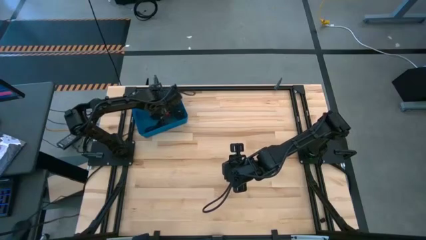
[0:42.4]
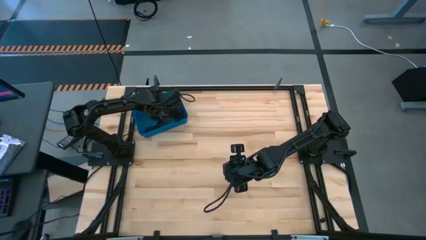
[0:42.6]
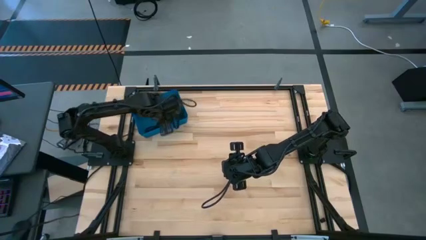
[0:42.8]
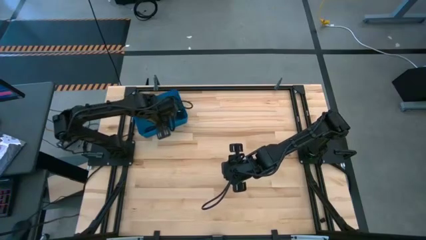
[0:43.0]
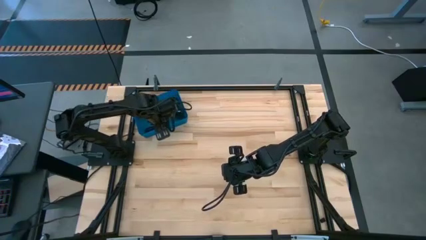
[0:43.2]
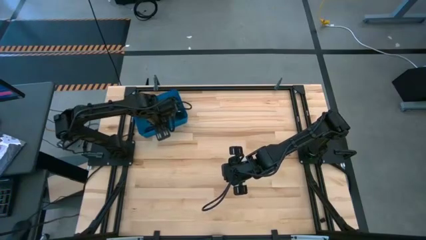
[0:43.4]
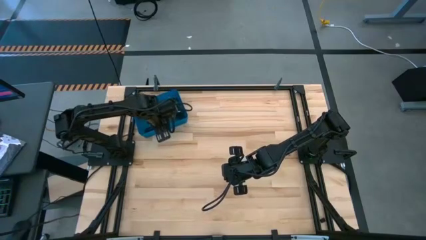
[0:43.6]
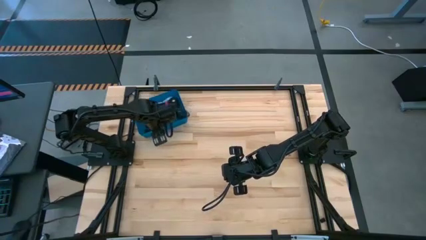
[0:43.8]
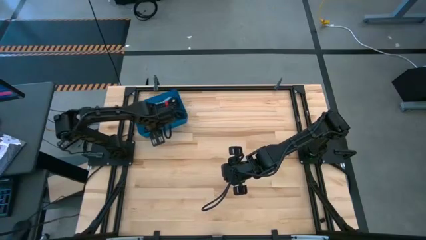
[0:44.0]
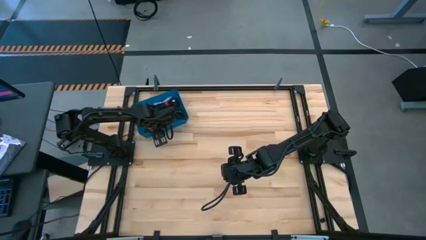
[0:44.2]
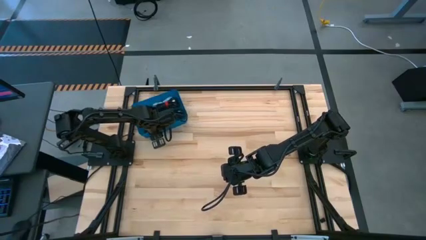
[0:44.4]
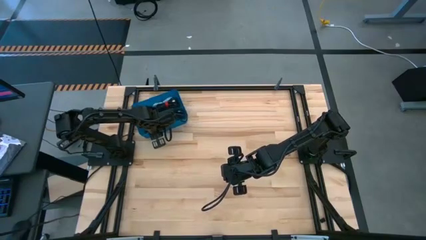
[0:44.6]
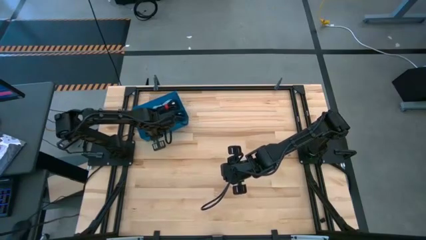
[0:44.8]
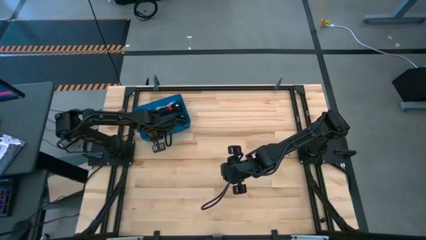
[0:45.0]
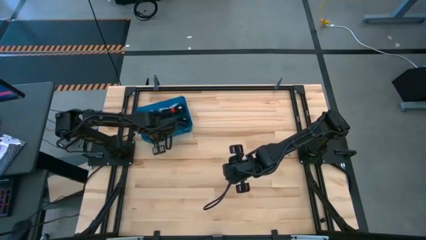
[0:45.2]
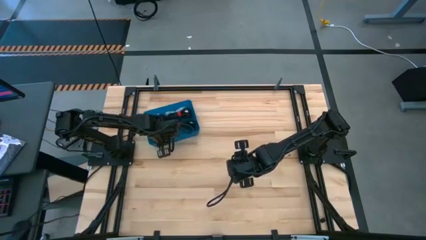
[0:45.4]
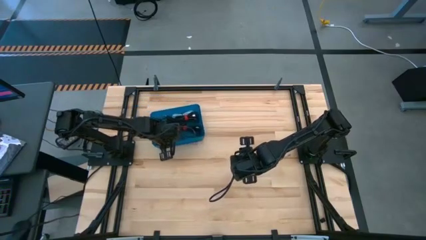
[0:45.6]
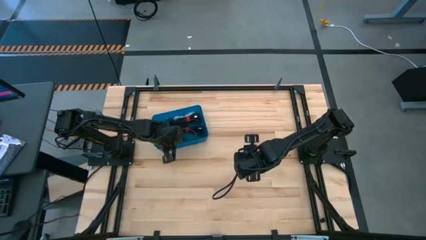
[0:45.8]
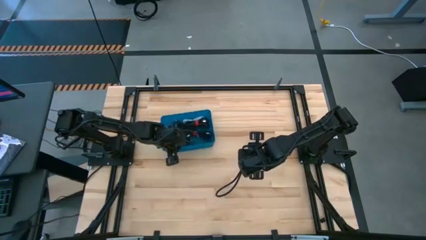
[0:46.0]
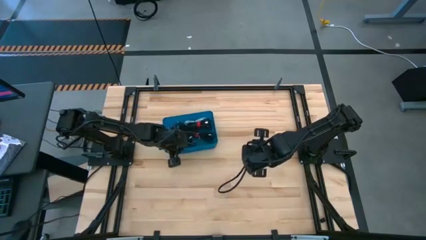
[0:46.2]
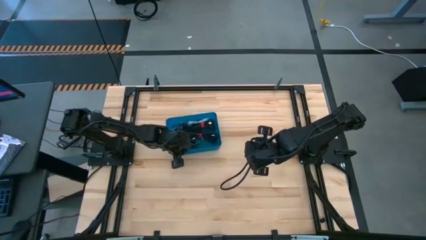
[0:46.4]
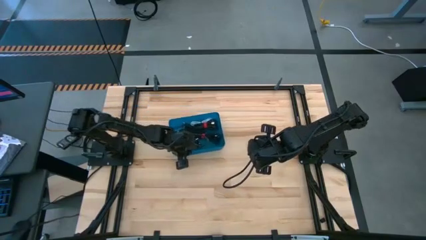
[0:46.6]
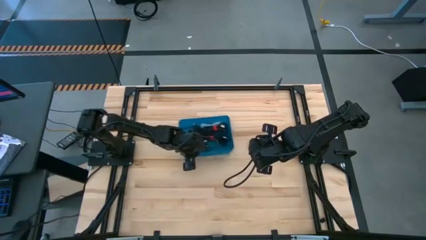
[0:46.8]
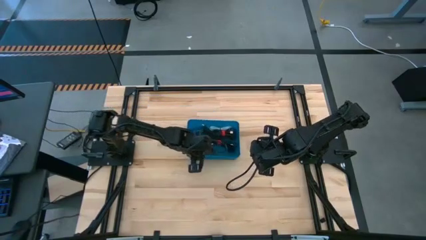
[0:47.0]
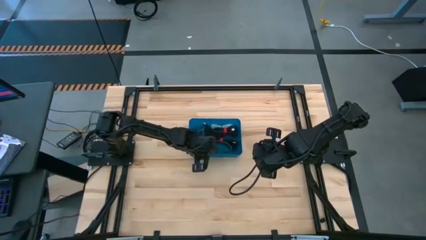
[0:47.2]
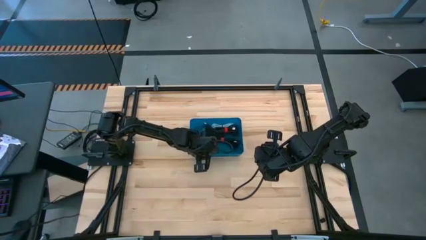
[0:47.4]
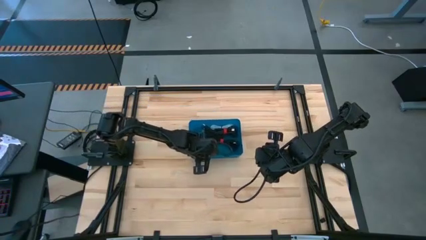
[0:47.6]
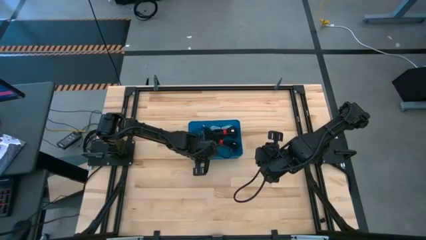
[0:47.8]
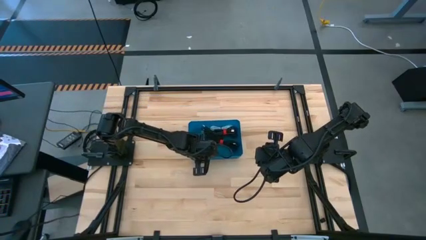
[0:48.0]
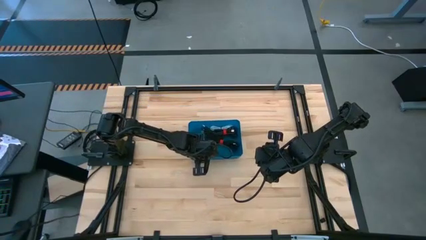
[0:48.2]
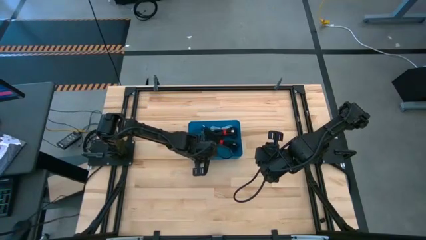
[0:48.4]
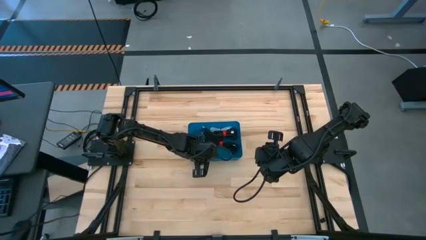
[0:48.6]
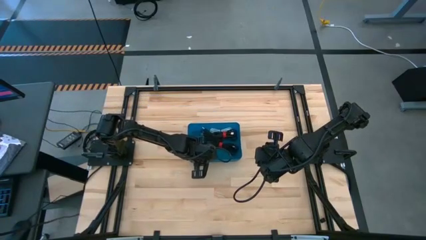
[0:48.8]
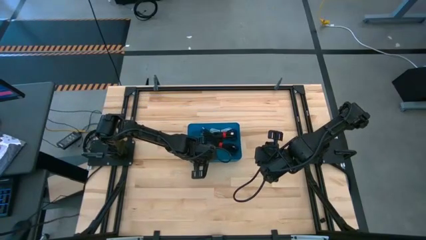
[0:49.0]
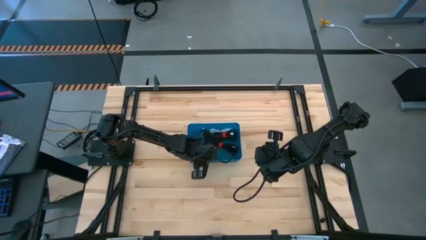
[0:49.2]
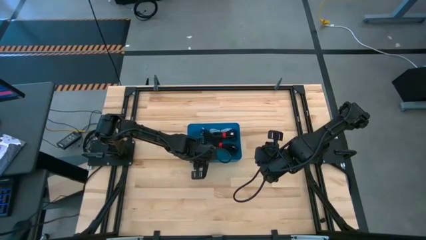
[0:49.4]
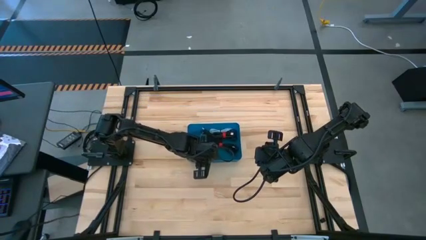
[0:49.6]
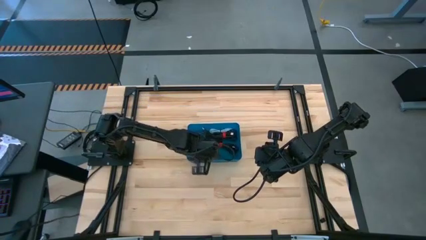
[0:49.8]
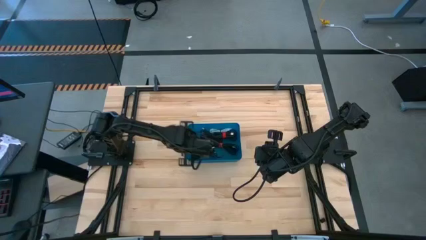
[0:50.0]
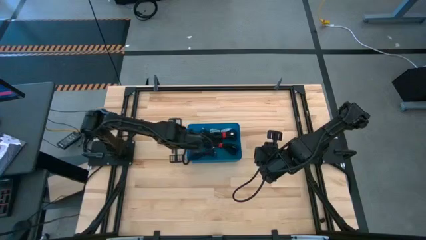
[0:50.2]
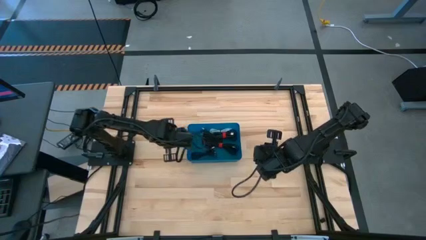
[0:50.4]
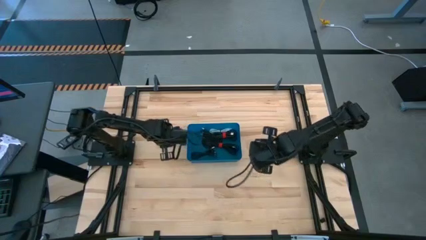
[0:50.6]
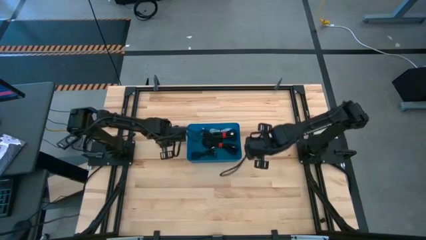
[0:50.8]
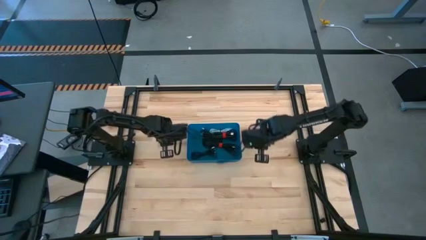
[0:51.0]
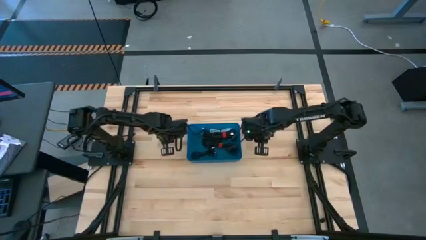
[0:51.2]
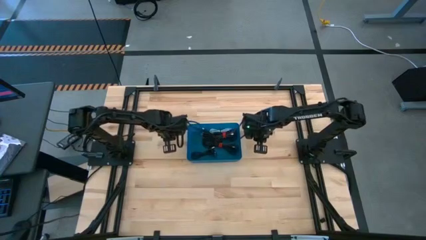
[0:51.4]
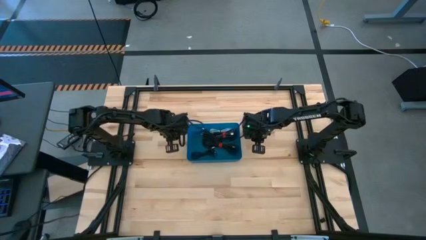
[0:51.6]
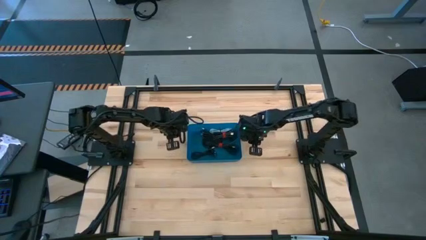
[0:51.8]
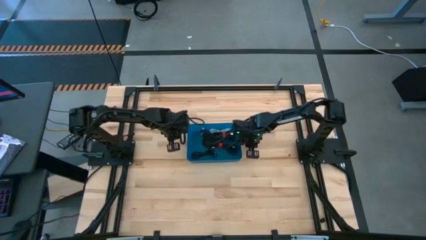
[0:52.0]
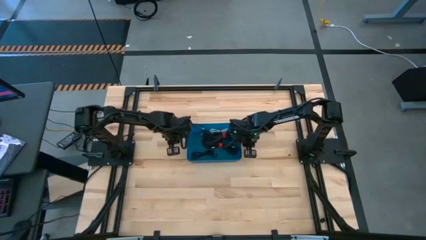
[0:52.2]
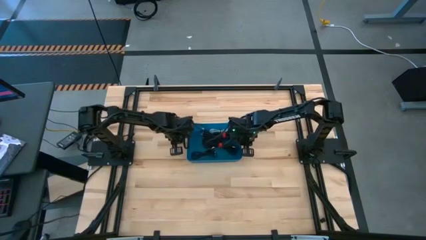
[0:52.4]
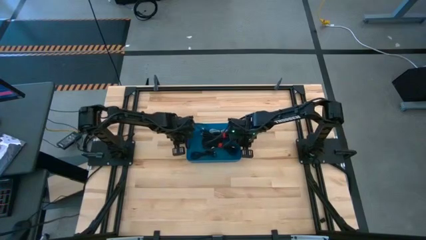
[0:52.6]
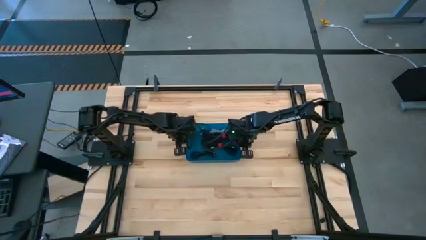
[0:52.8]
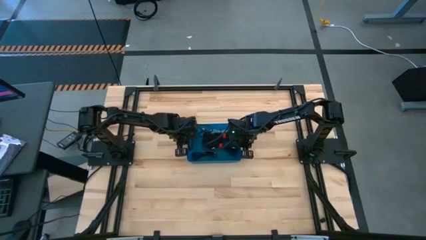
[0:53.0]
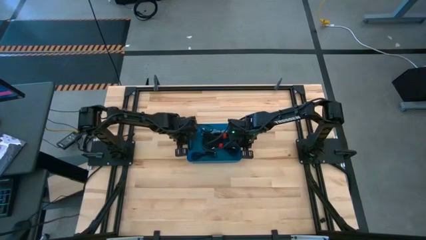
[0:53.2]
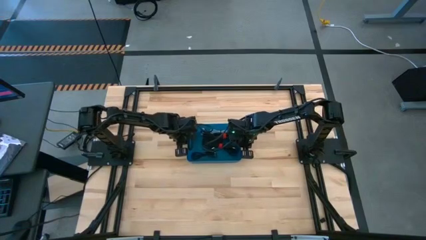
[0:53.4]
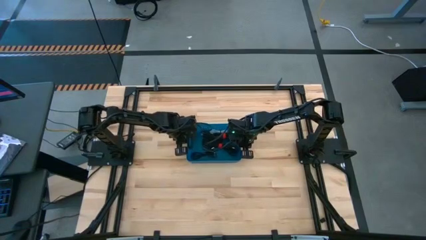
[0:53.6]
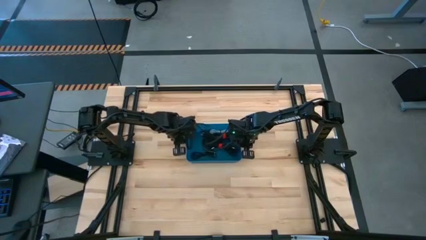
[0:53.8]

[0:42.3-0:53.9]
Task: Pick and place USB-C Cables
Move the blue bin to the center of the table

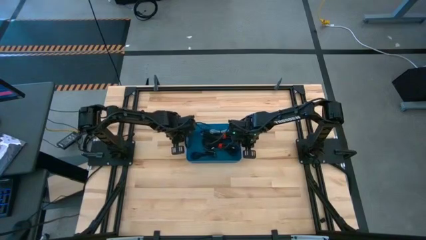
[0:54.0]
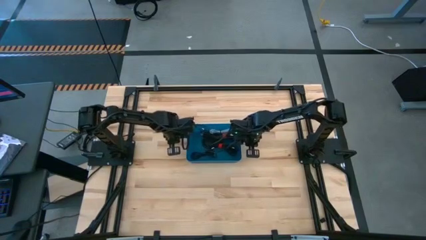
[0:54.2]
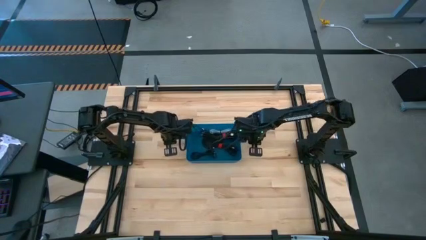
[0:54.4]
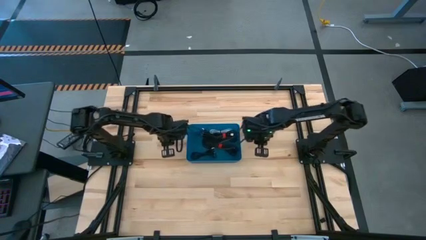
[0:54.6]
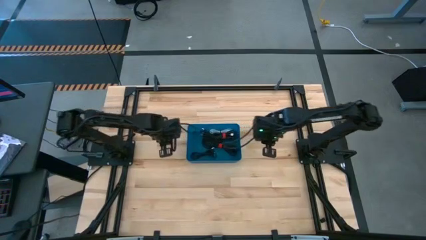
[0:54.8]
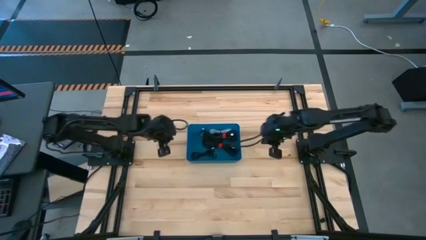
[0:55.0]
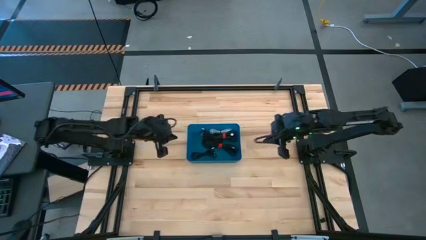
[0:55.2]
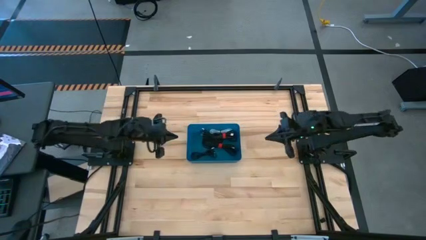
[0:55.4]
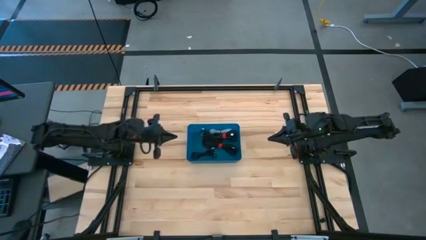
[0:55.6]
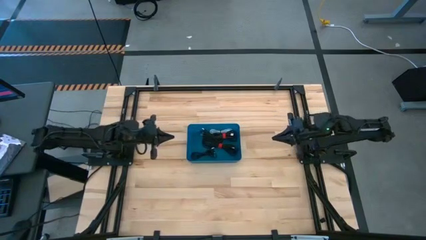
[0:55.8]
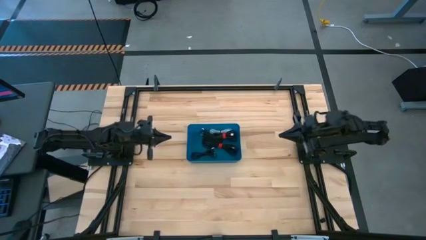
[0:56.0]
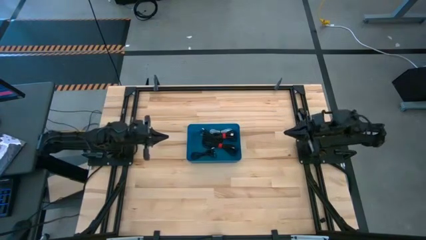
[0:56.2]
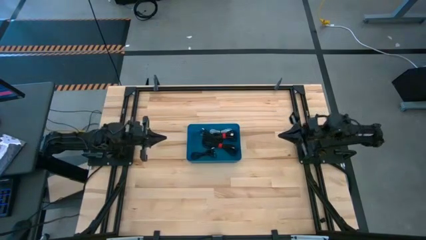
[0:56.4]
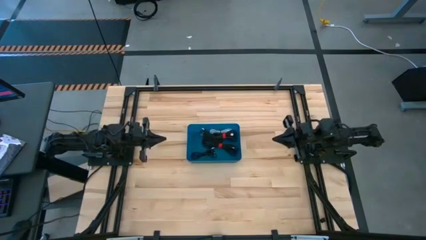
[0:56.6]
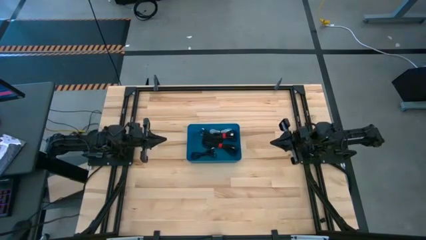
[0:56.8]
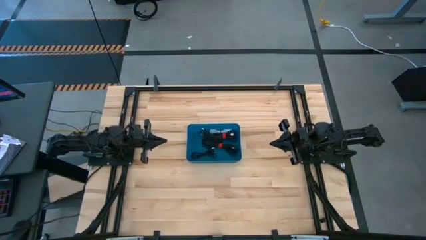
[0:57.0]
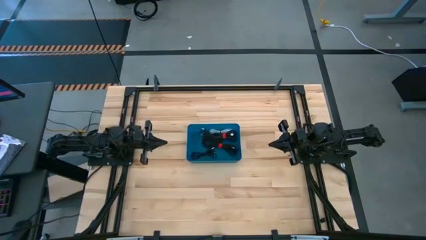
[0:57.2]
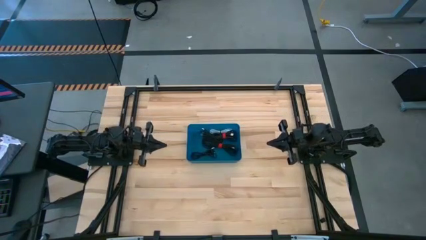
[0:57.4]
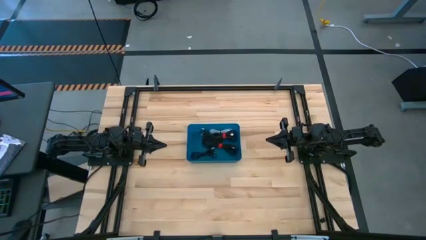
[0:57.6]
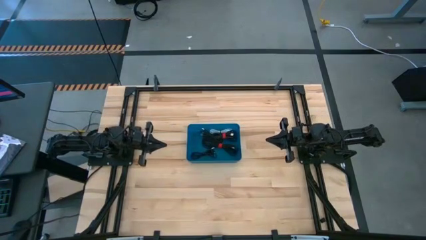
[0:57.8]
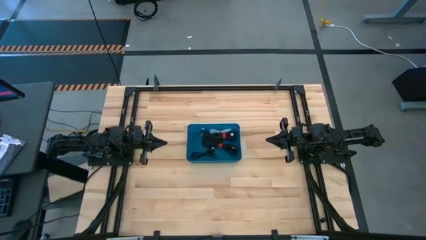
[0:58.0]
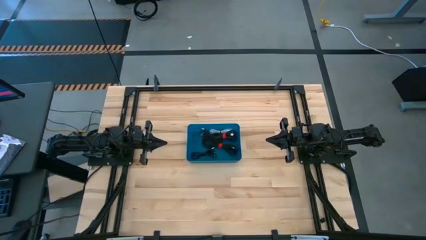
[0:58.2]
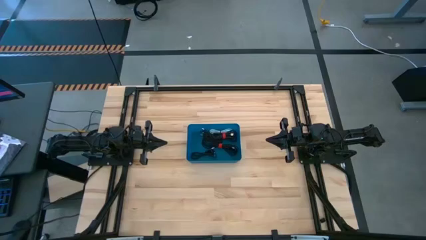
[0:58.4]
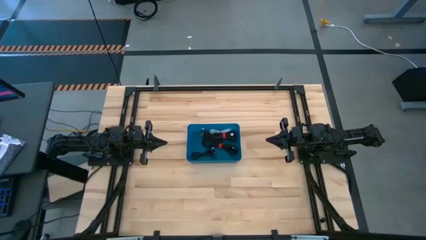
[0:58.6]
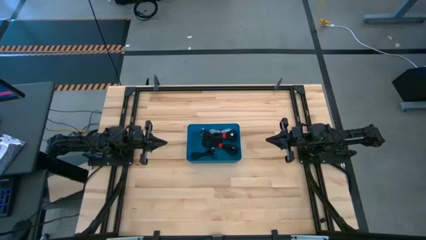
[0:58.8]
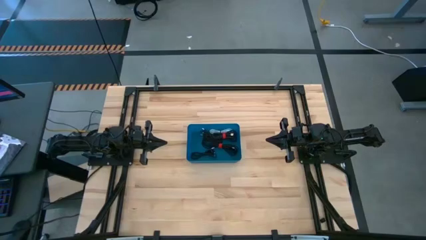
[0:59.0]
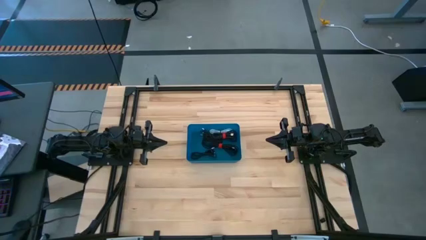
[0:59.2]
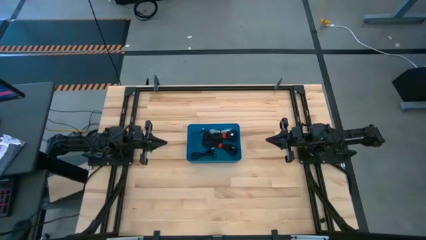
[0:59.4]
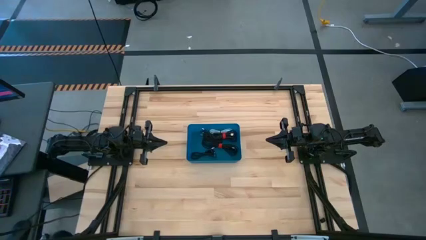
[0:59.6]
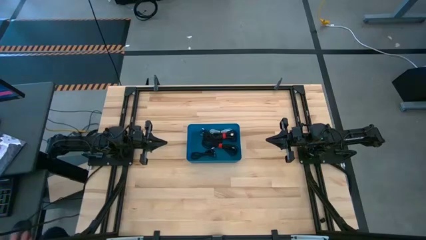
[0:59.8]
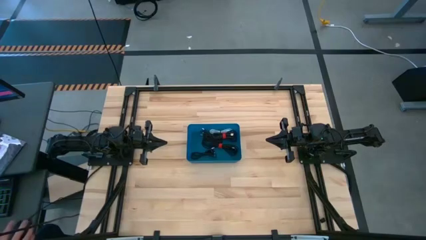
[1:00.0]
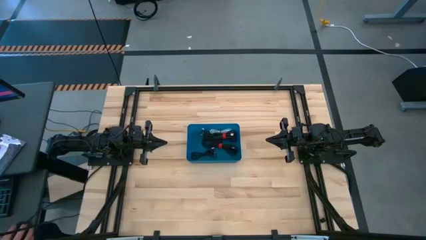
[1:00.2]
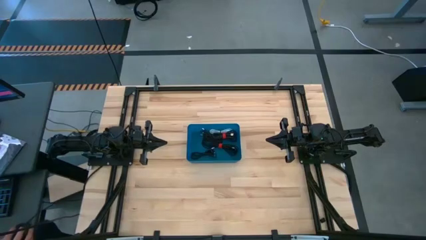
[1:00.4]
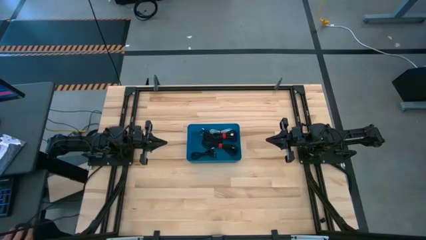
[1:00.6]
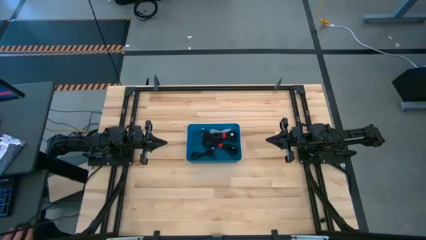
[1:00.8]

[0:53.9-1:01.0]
Return to Home Position
